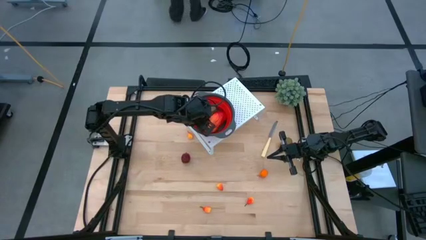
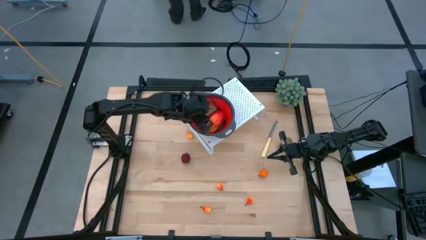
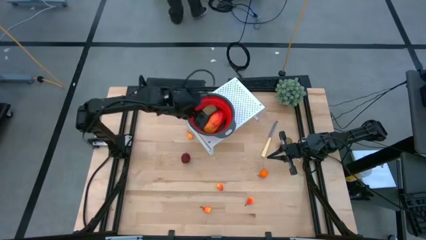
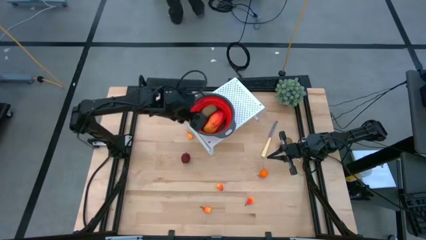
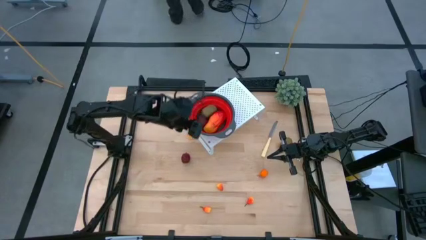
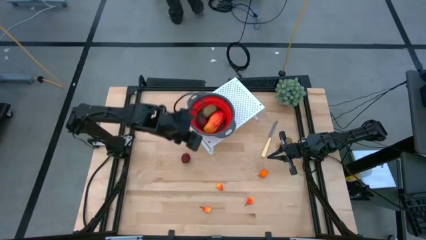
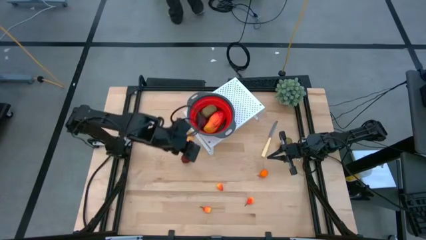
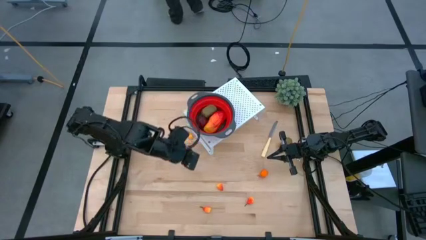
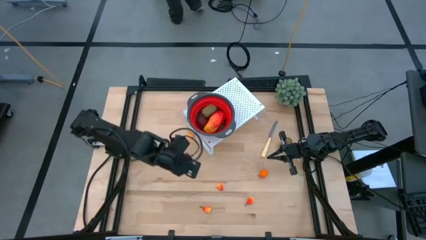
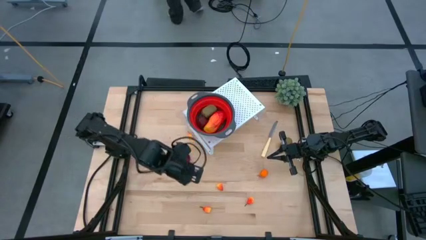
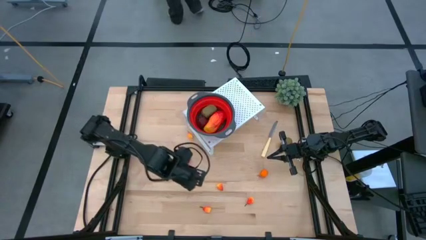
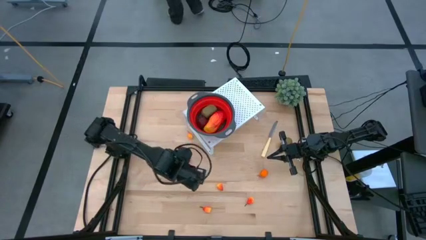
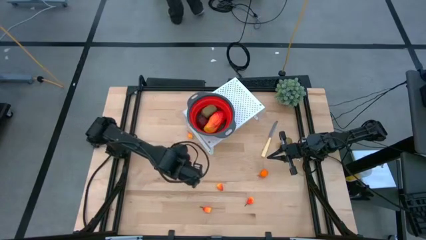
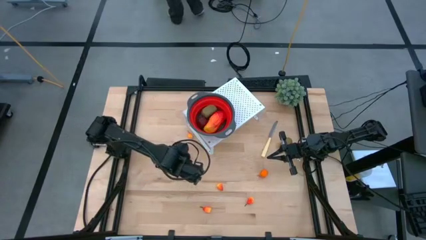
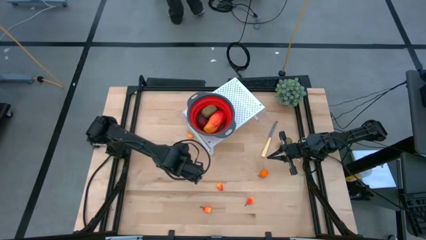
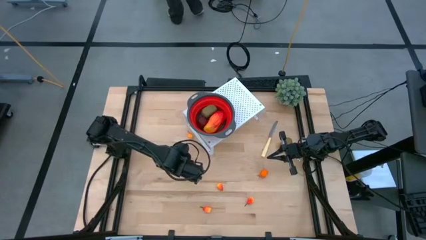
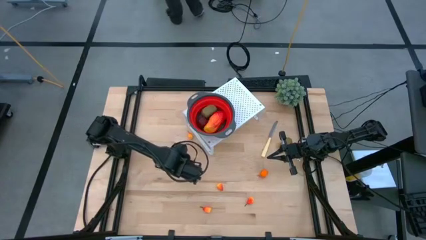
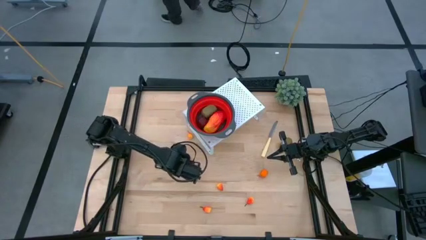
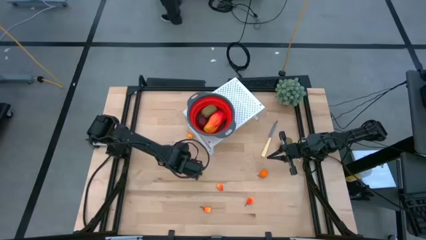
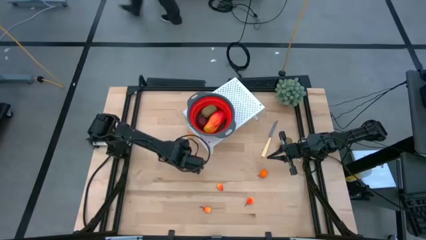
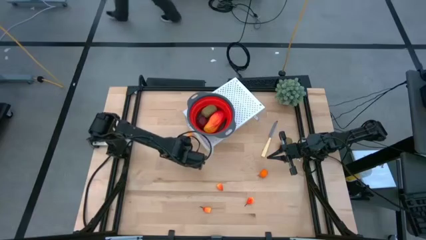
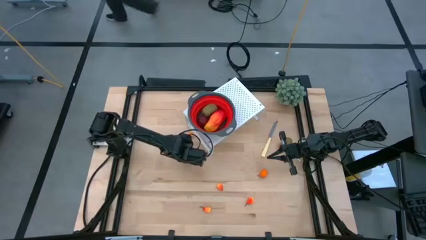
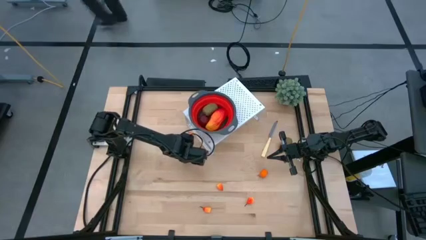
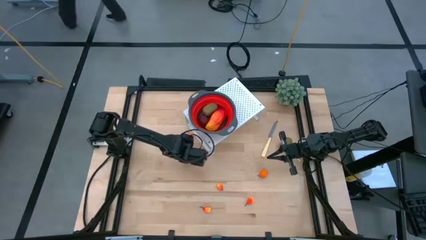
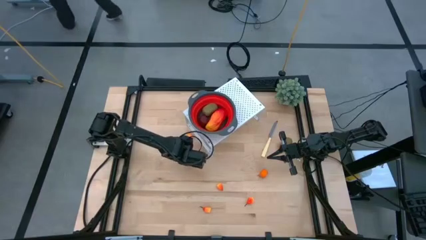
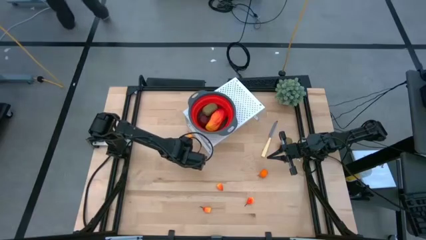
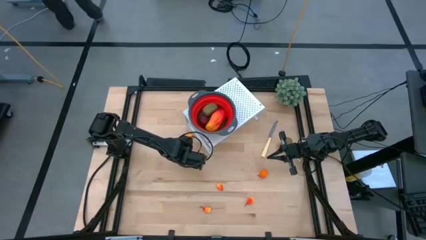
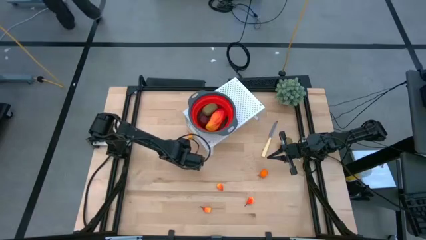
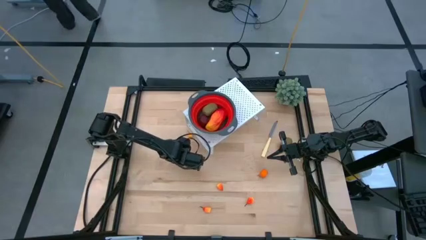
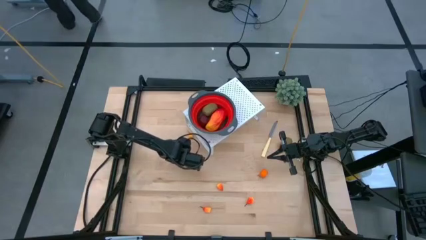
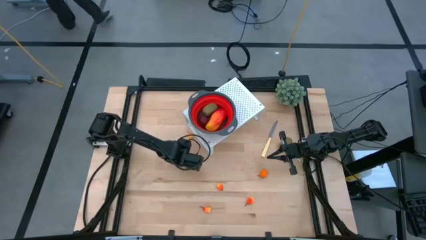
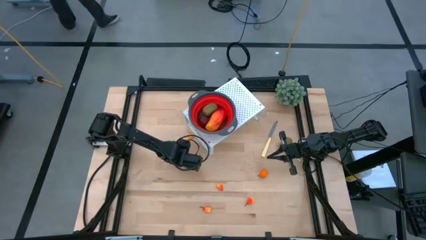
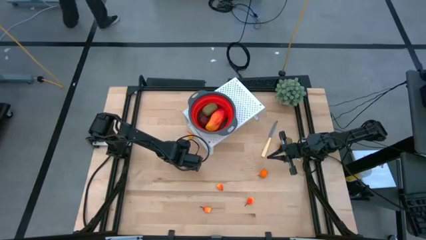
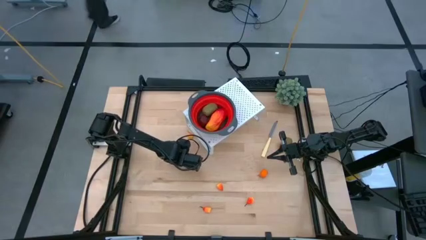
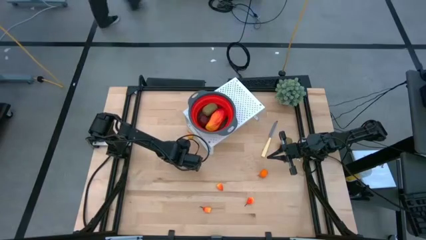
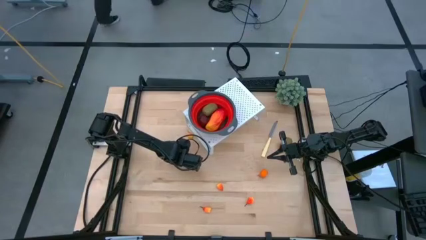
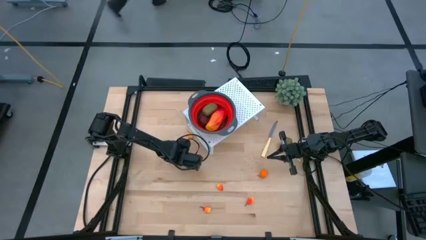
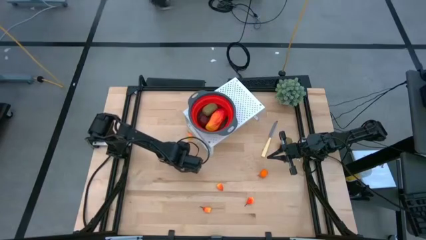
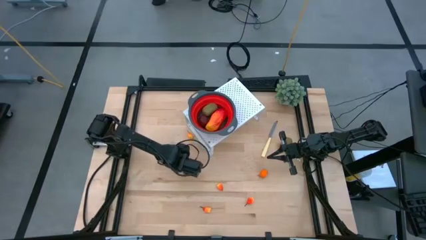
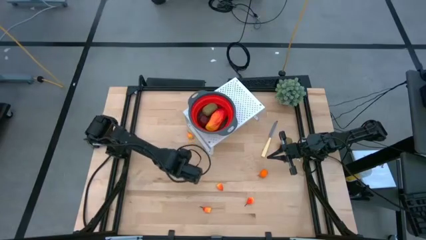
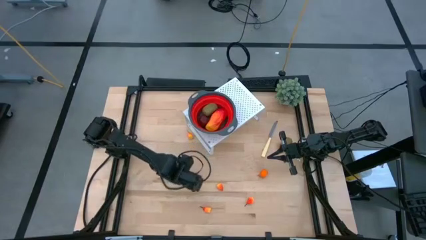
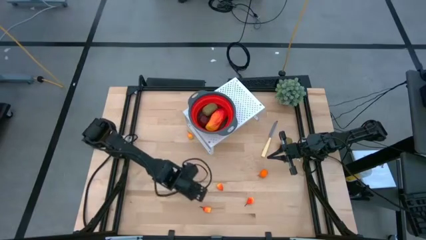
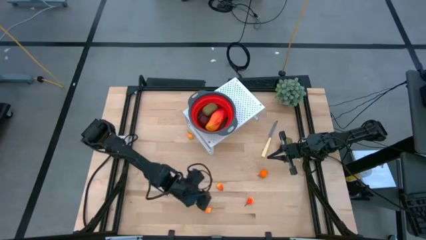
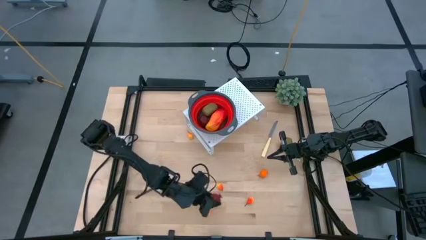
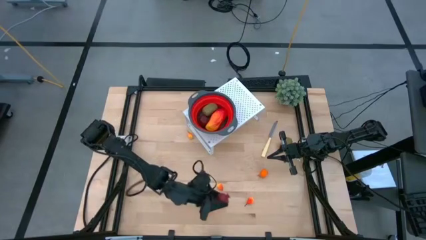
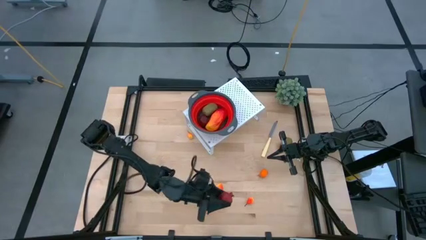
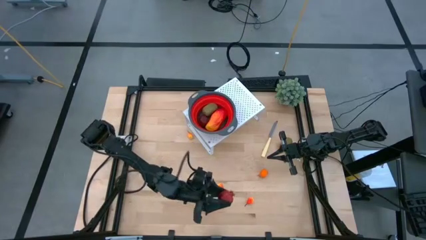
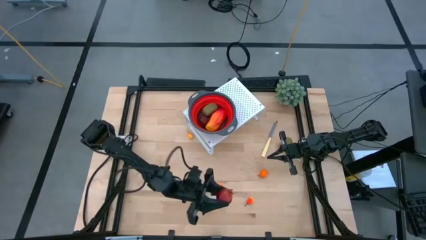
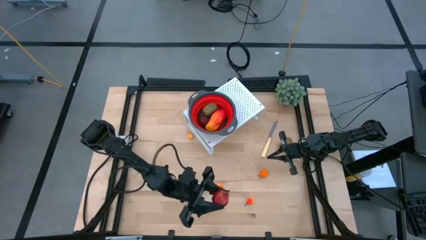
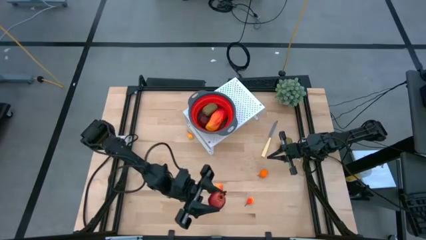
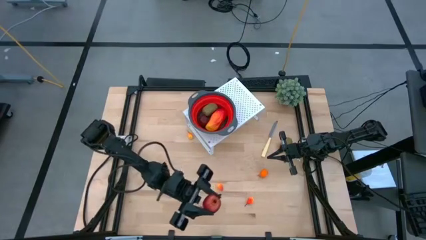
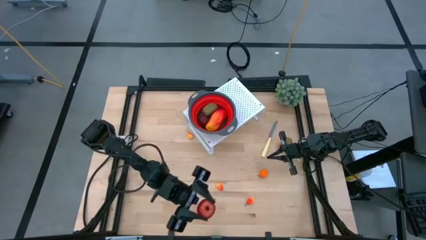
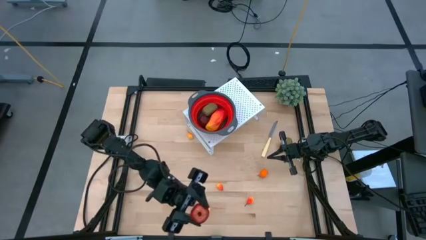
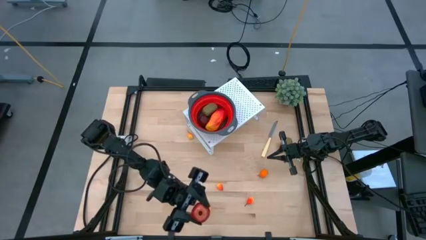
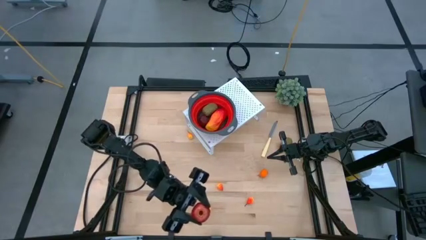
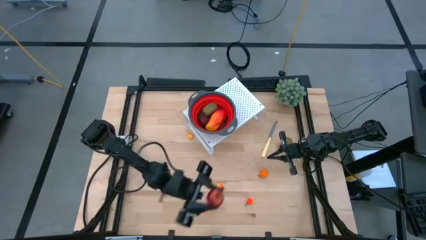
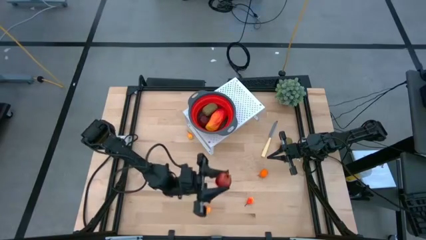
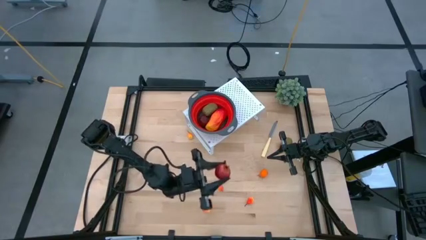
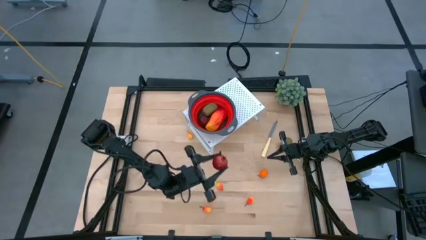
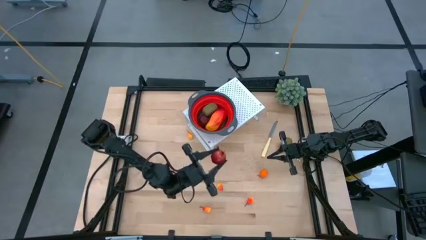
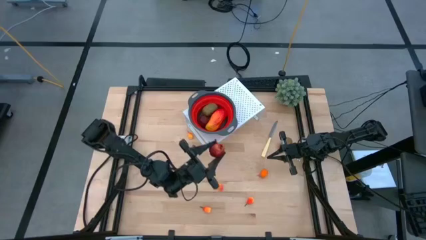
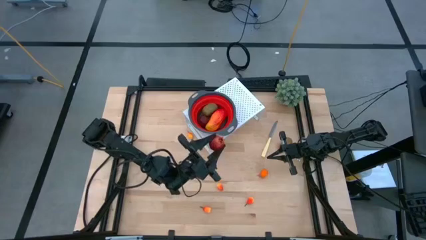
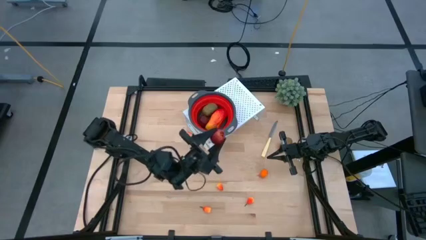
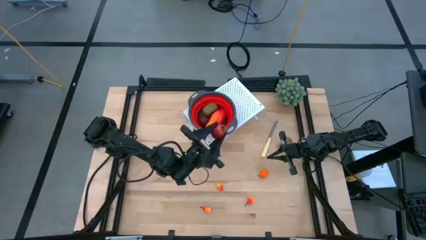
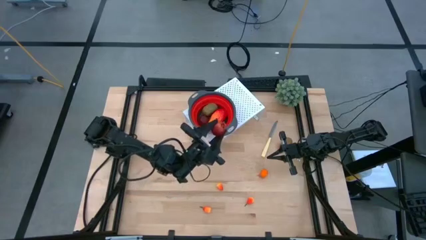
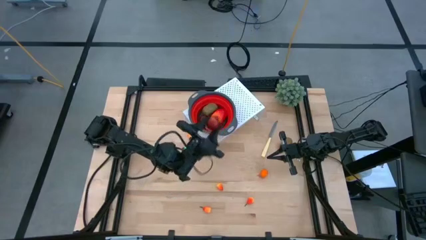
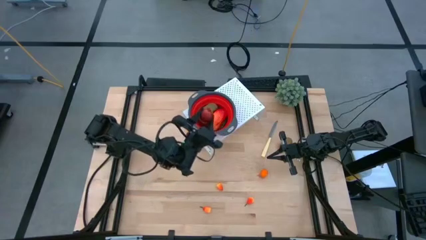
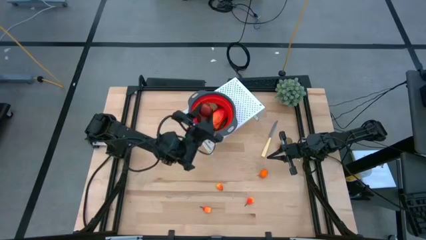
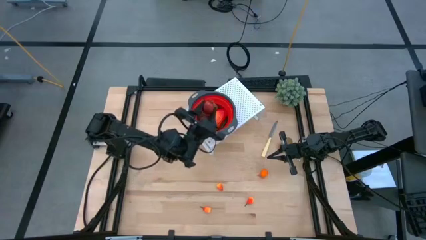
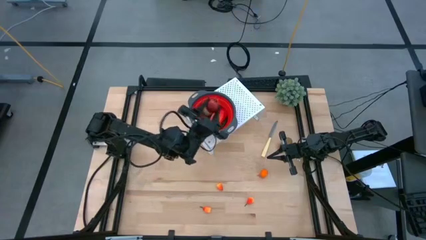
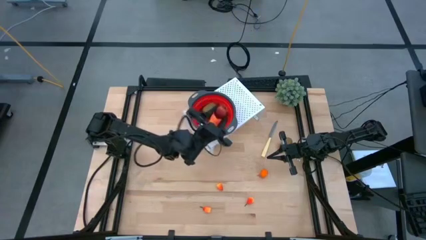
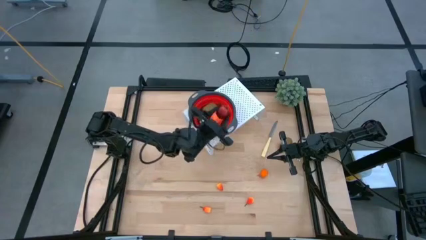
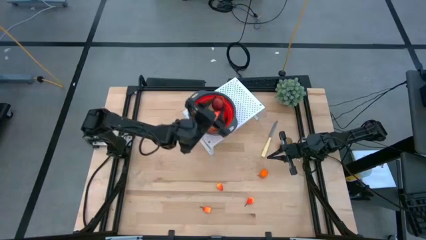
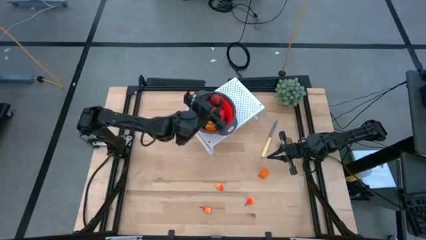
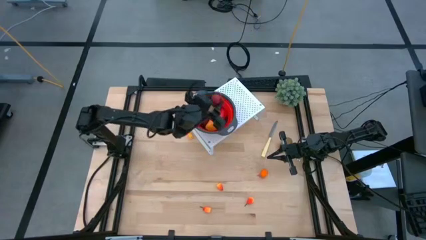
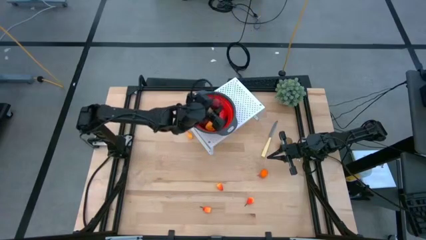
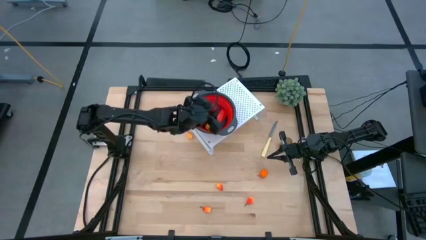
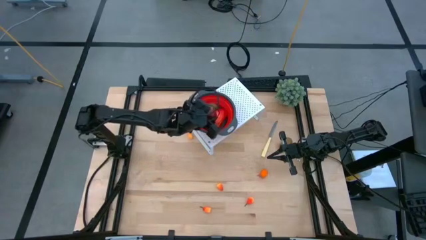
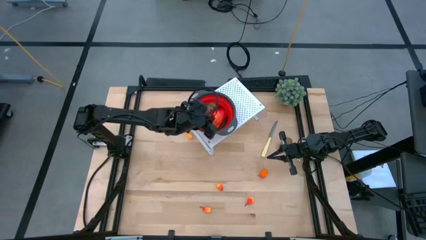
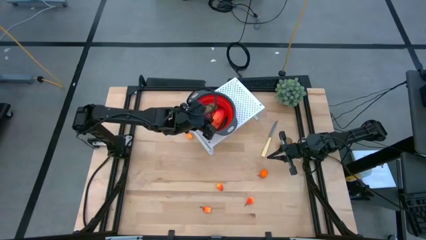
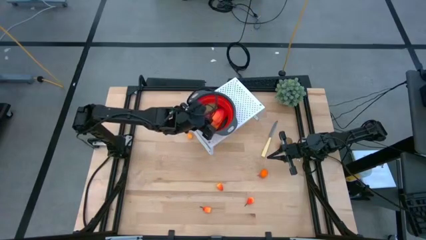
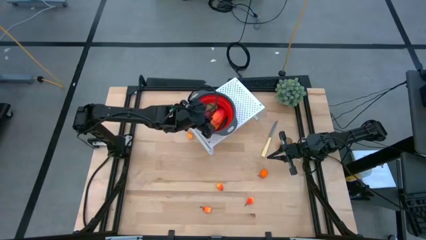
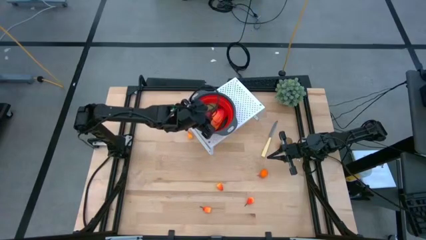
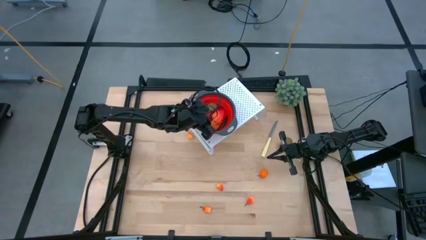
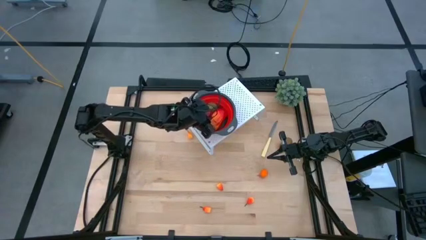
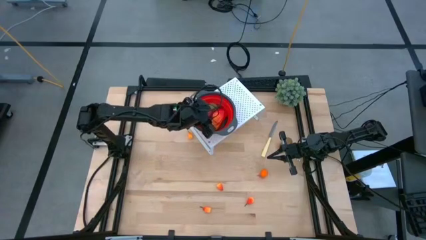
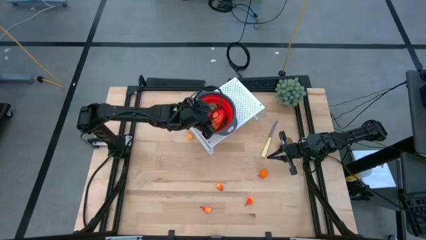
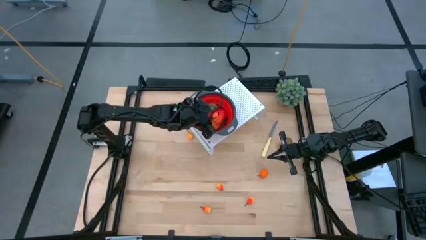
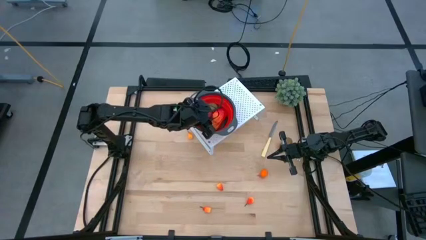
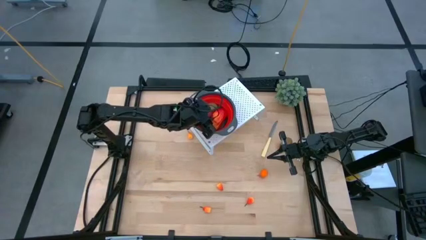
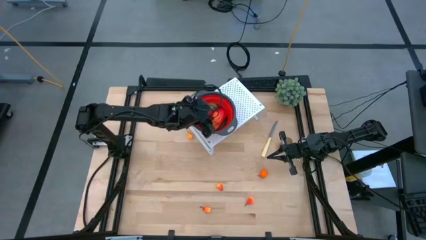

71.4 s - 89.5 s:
Task: Pick & Place Fruit
Put the pomegranate into the red strainer bowl on the shelf
